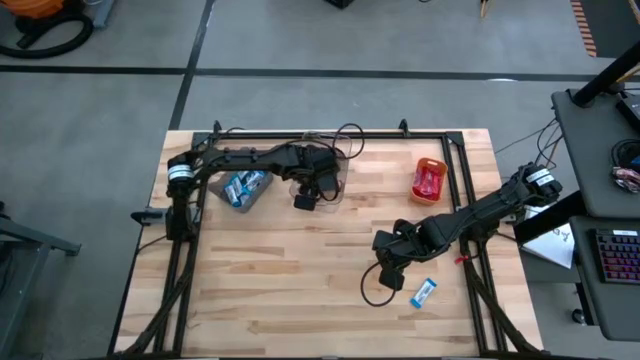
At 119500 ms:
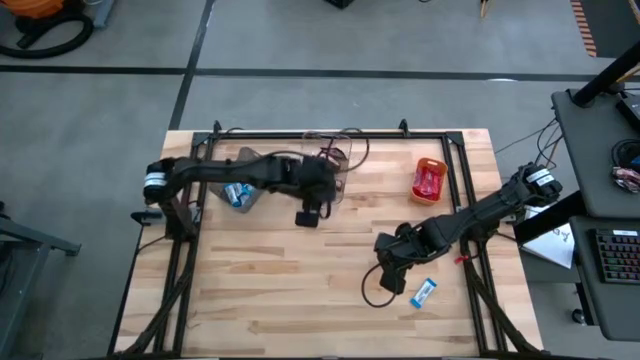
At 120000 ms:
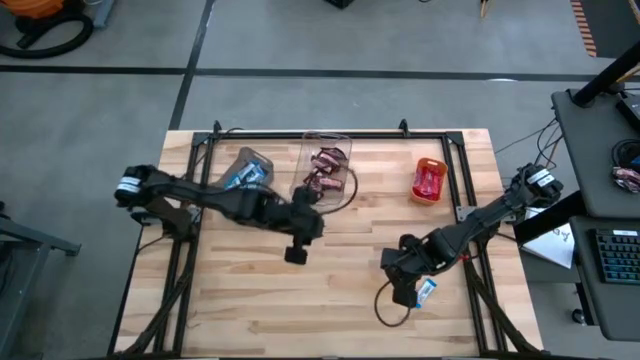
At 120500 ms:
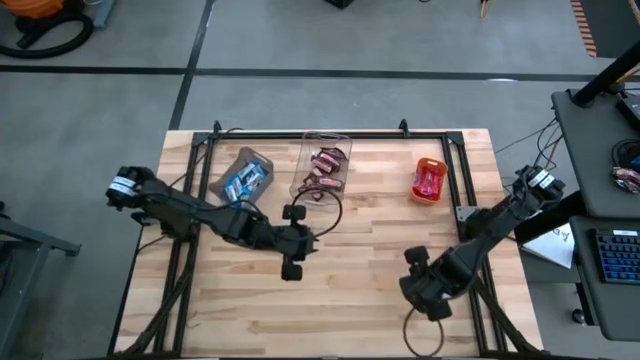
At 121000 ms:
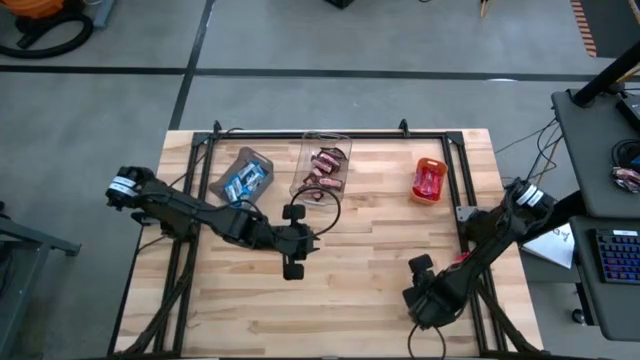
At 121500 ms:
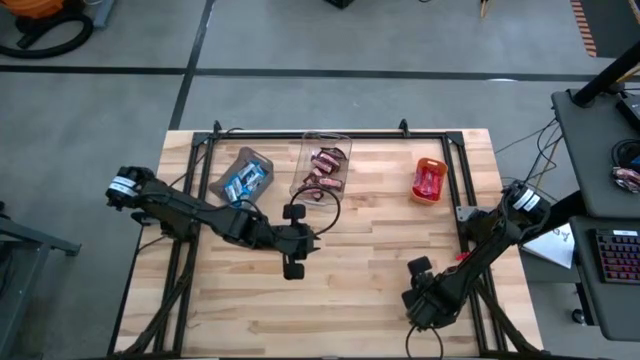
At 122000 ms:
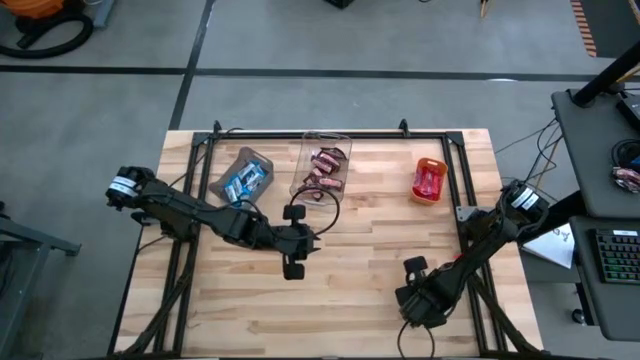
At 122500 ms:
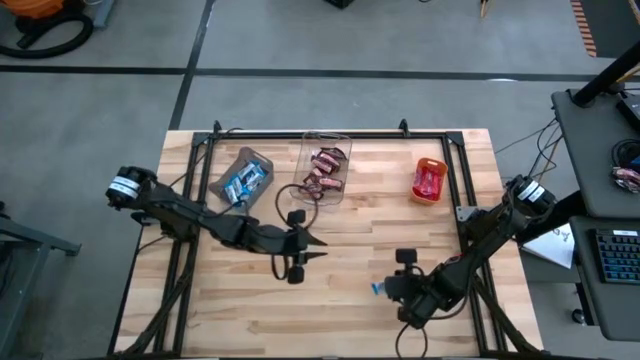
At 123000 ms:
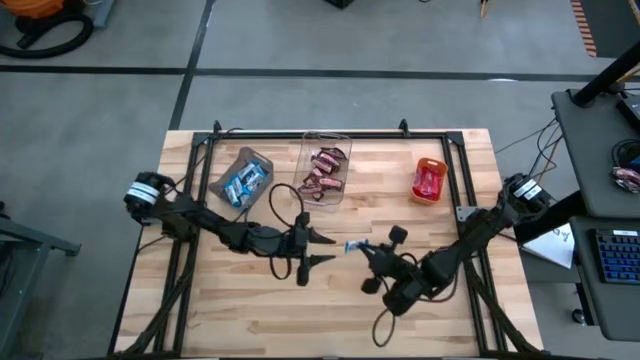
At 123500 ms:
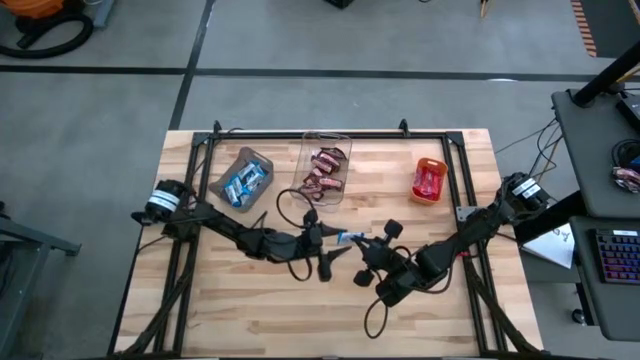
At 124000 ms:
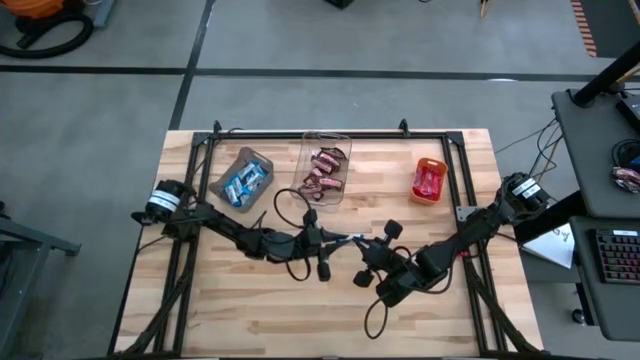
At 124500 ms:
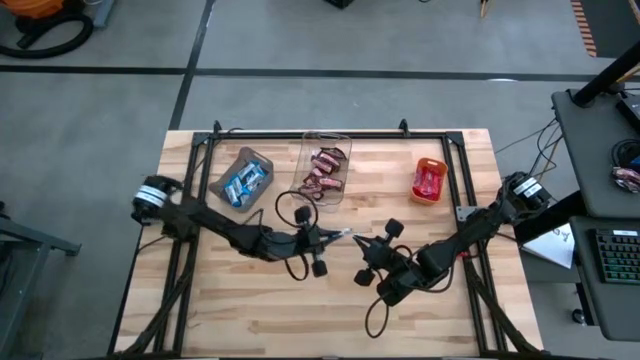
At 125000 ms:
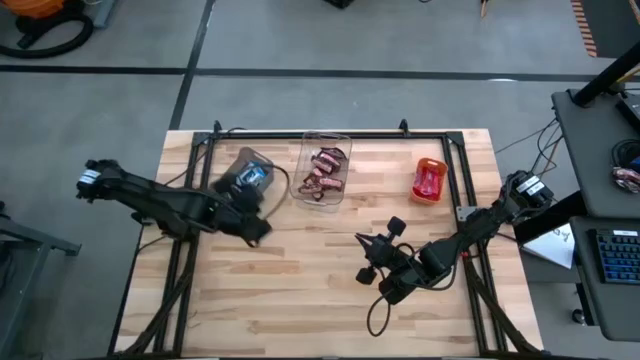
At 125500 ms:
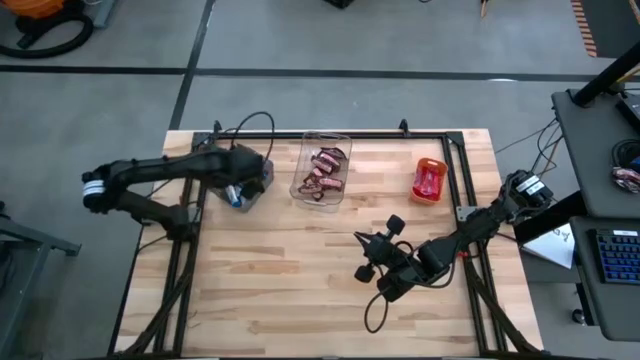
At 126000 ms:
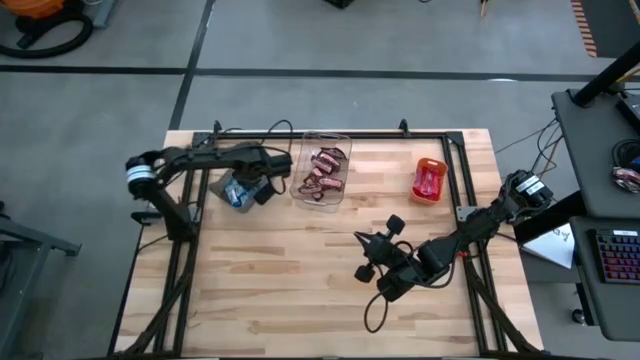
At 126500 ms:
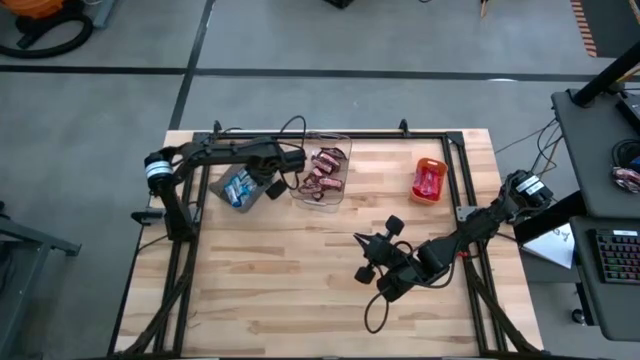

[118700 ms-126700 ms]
Task: Sort candy
Put the blue chocolate into the black bin

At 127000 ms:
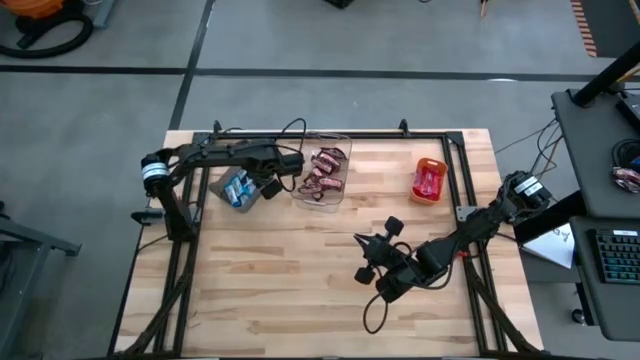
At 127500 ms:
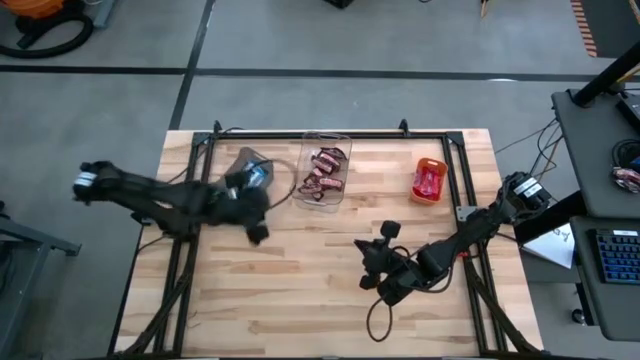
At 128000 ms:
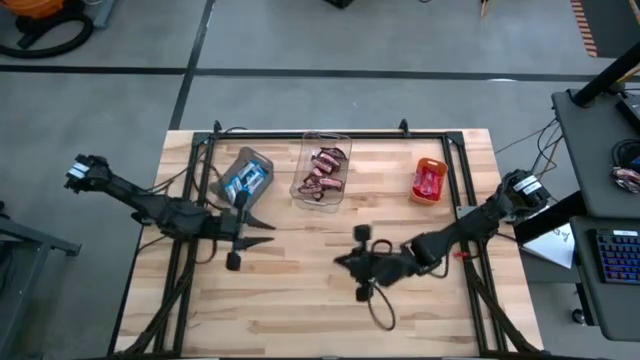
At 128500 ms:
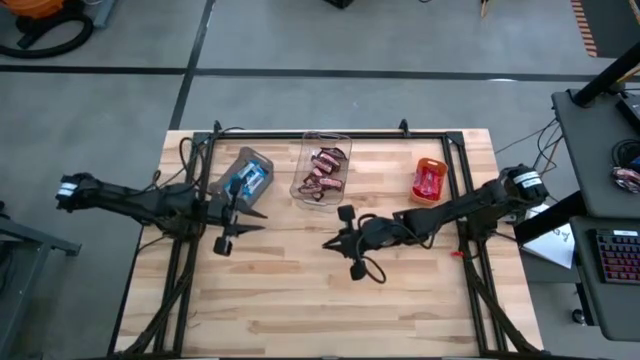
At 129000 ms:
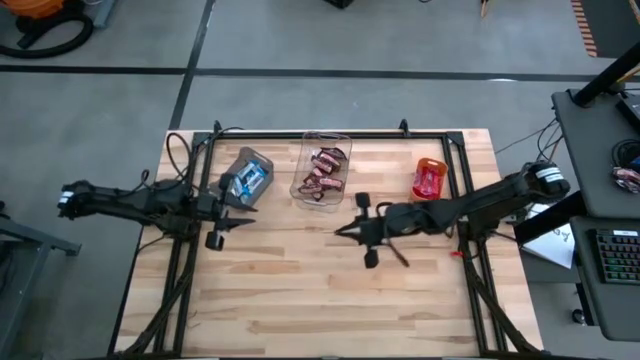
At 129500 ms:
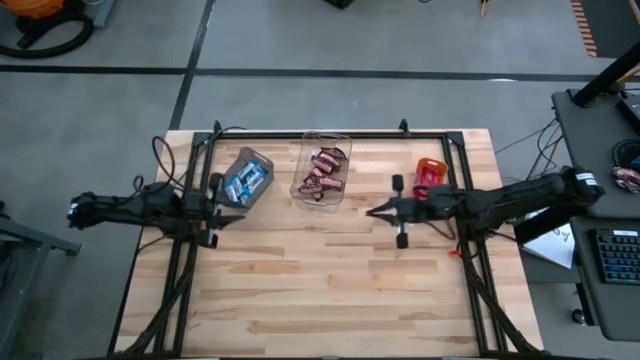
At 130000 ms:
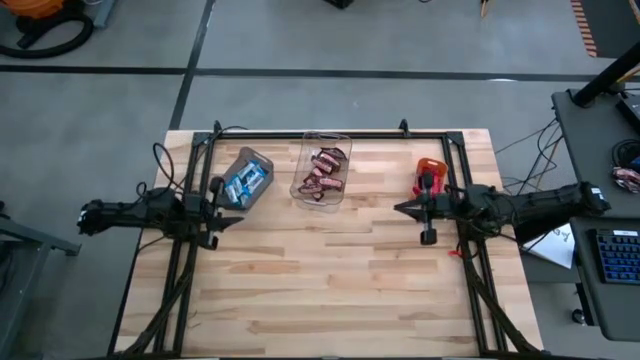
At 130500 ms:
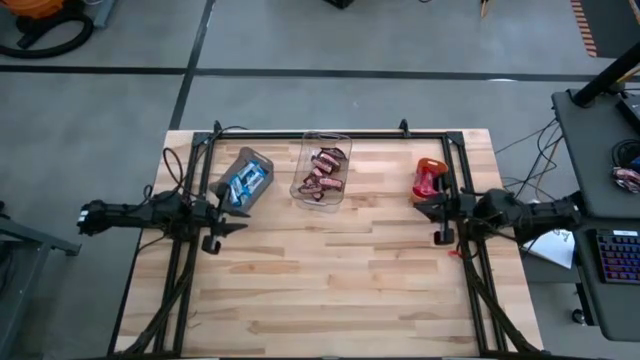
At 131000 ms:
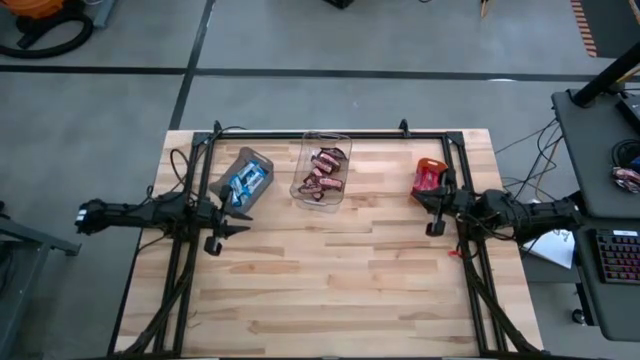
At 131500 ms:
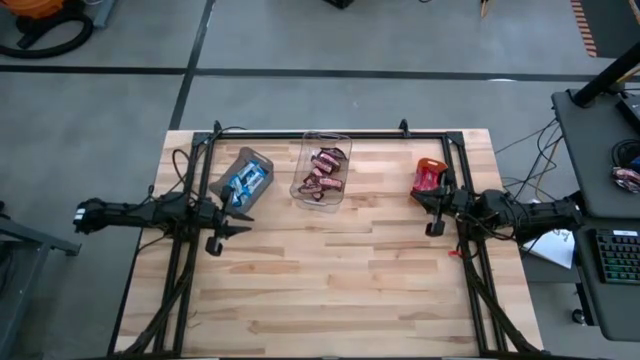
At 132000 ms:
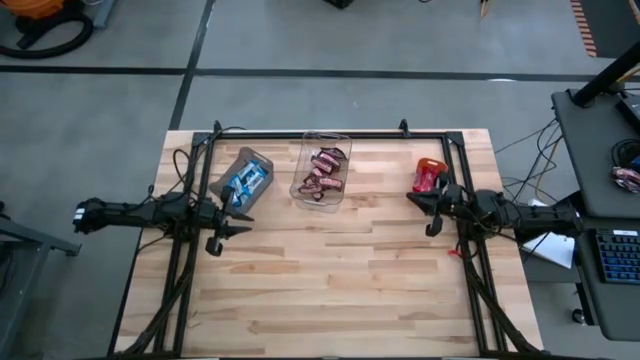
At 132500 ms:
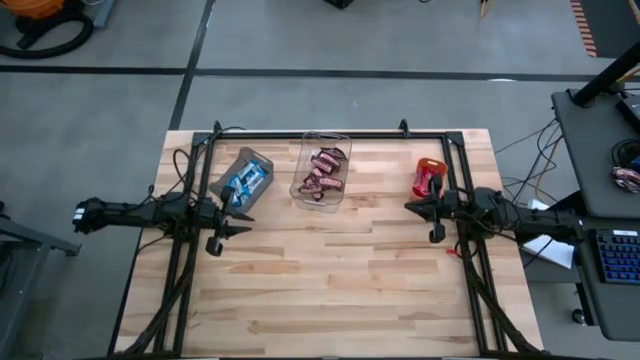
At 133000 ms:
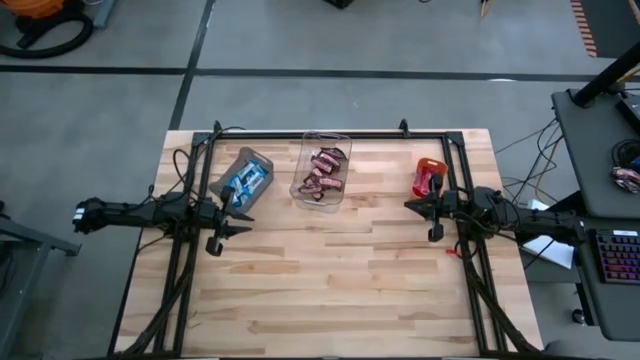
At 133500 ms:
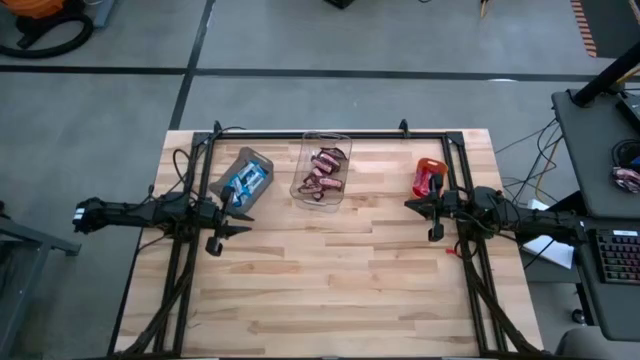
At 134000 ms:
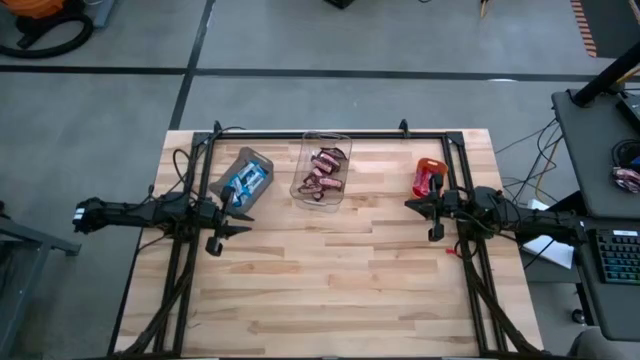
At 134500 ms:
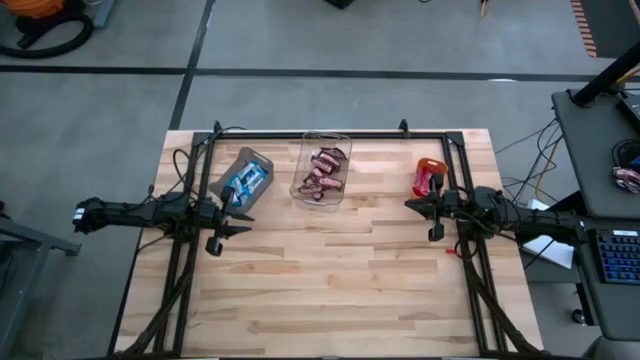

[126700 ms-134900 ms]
Return to Home Position

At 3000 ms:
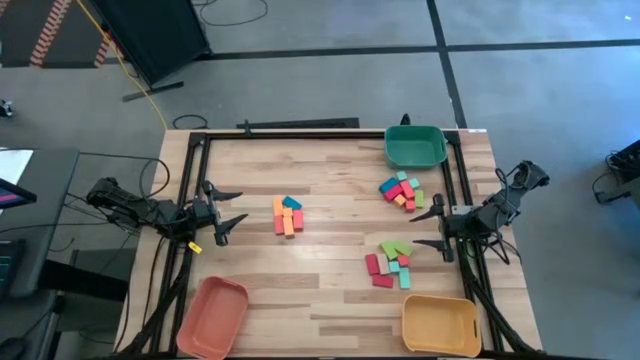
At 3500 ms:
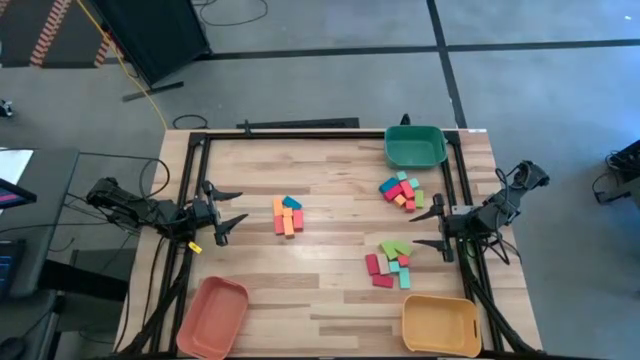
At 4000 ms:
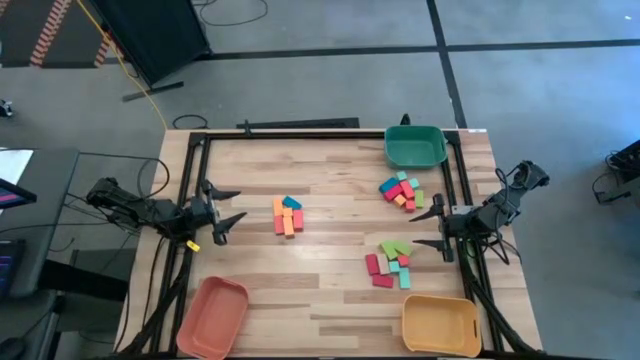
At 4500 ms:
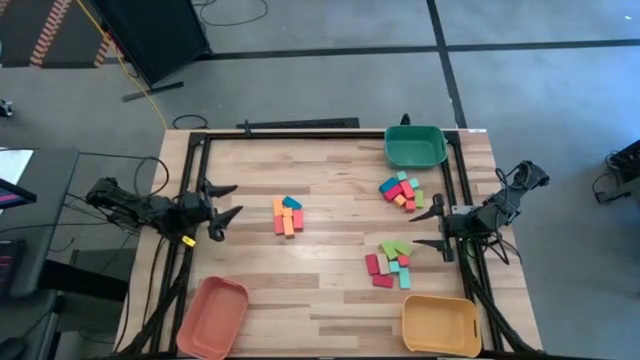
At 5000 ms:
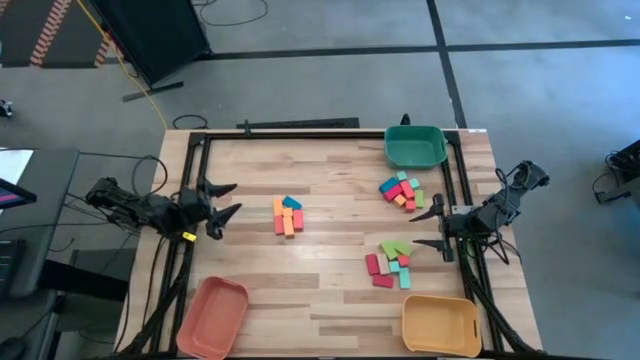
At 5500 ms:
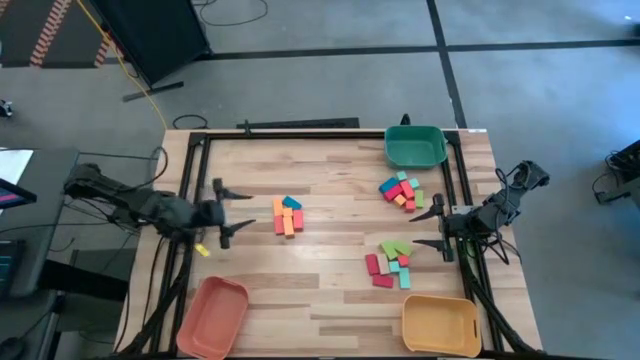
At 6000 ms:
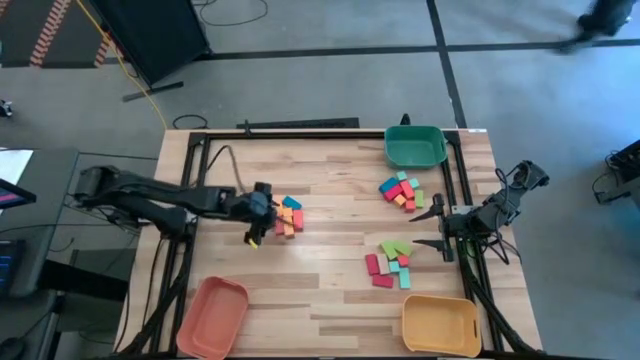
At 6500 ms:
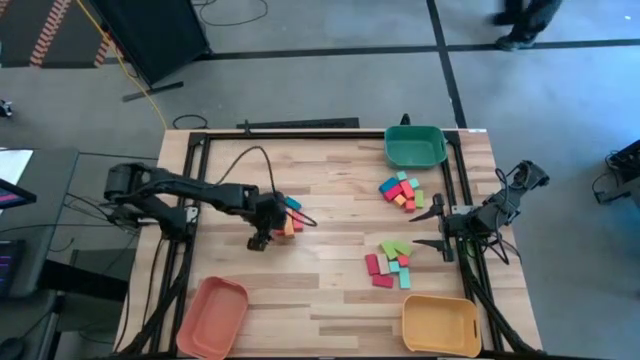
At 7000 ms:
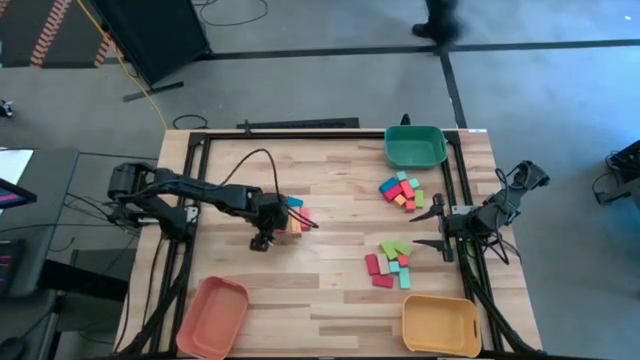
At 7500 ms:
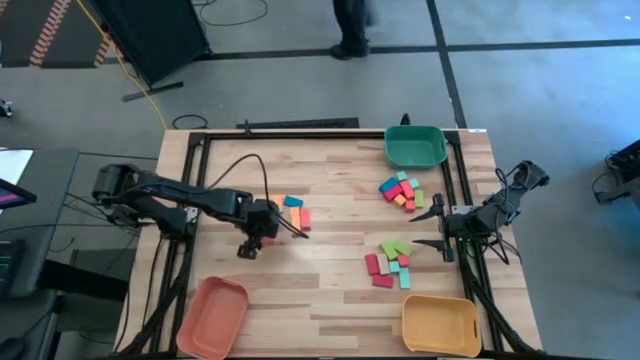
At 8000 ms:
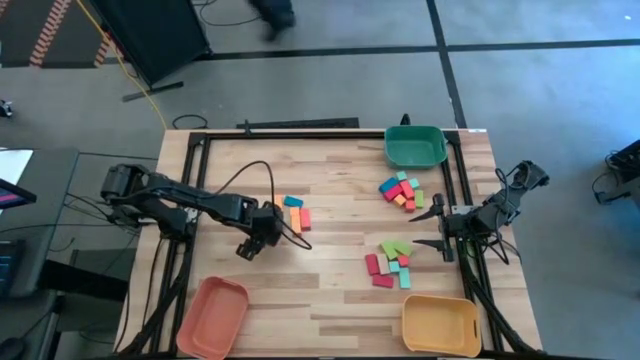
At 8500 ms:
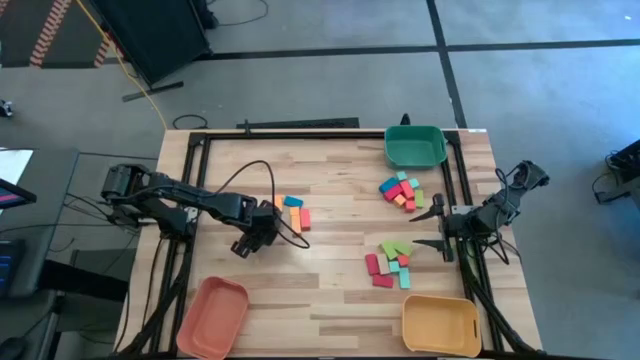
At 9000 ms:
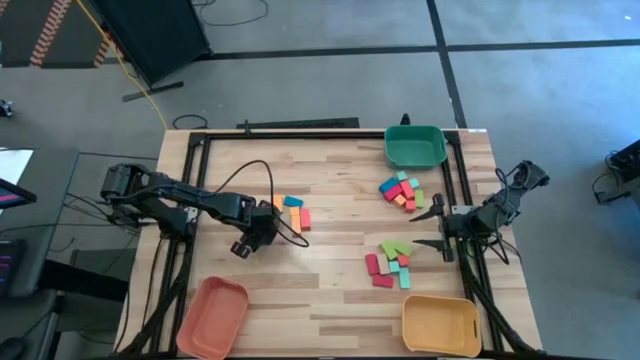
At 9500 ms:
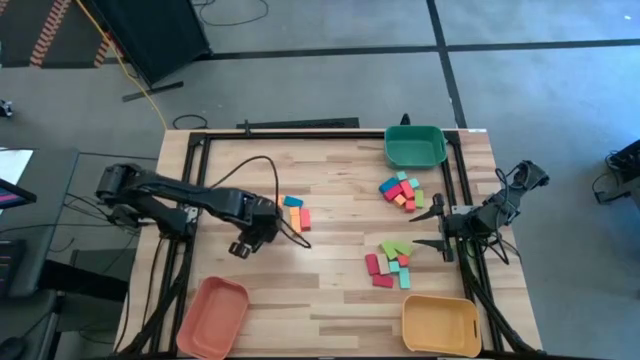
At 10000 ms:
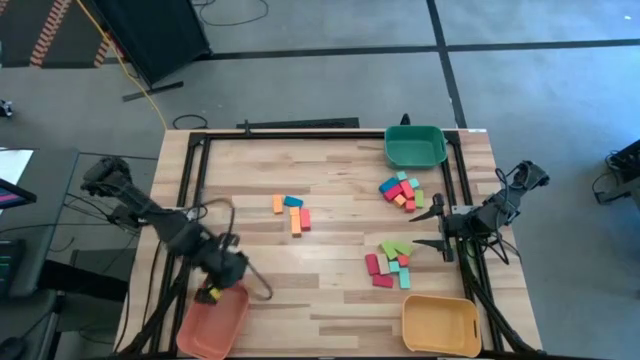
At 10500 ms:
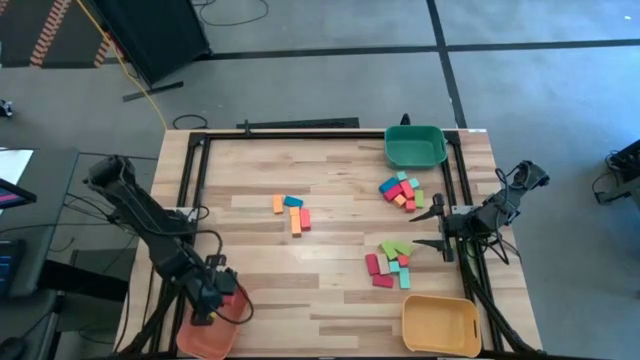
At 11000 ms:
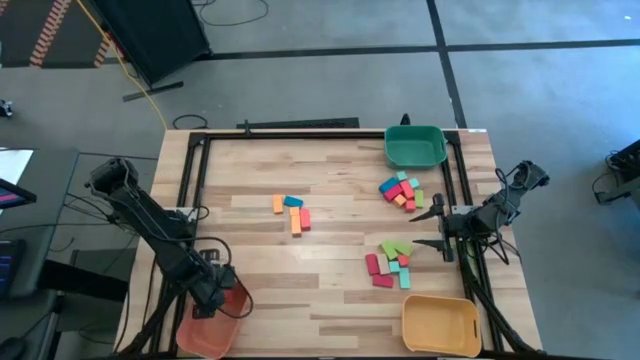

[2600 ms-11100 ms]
Task: Sort blocks by size
Put the medium orange rectangular block into the orange bin
